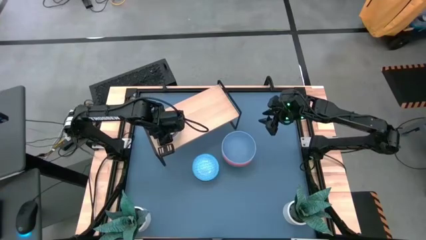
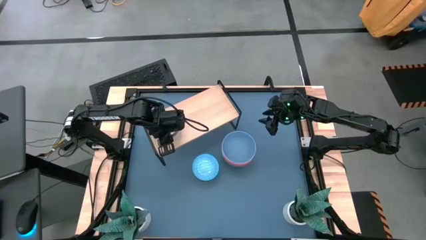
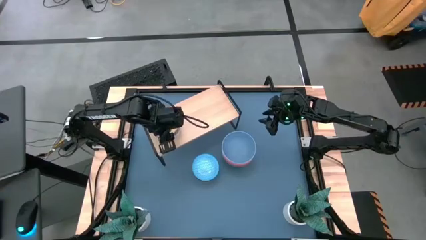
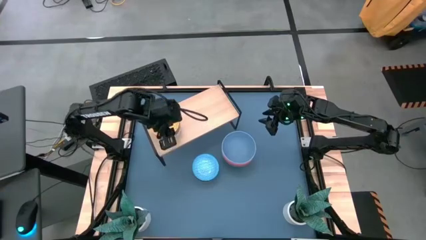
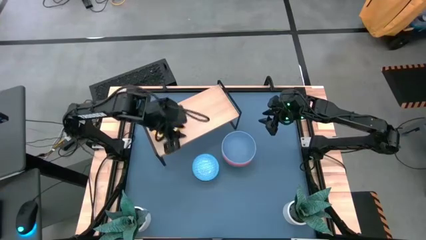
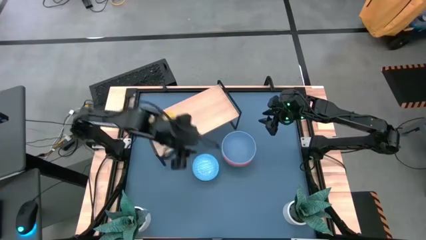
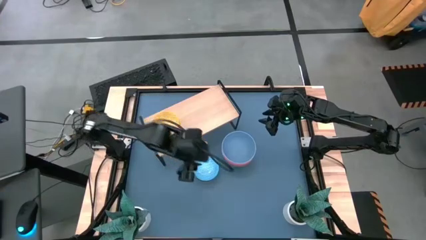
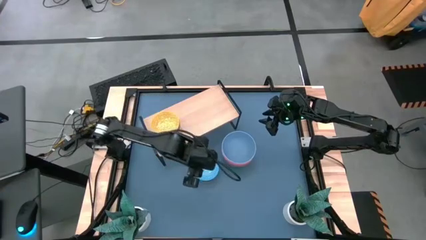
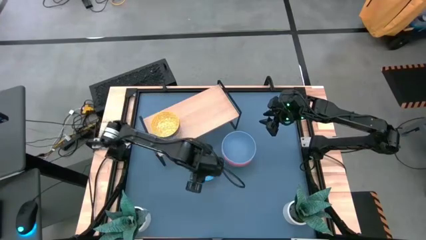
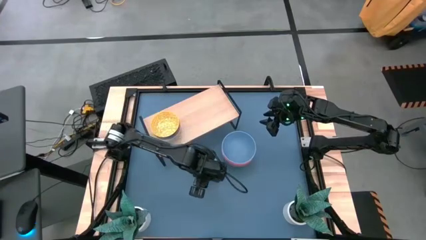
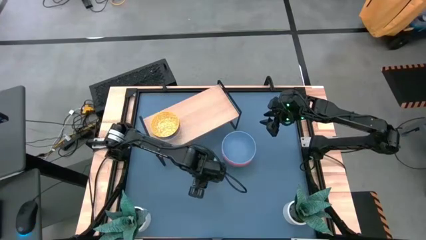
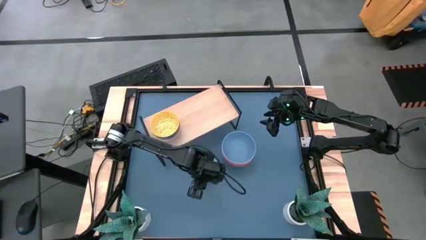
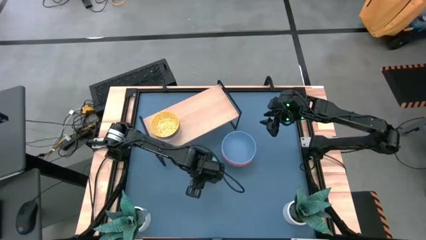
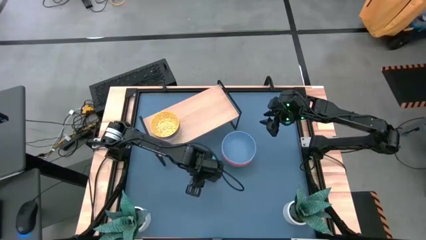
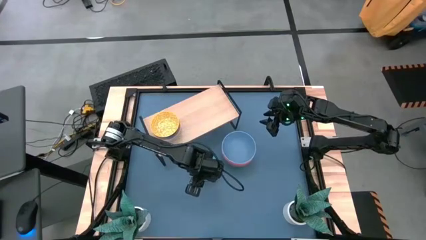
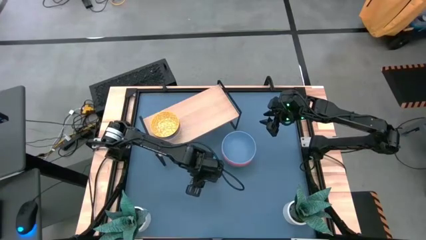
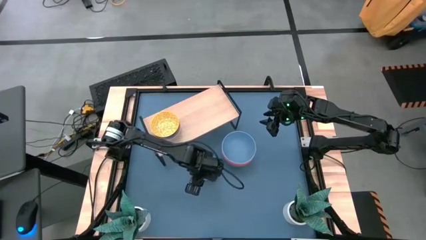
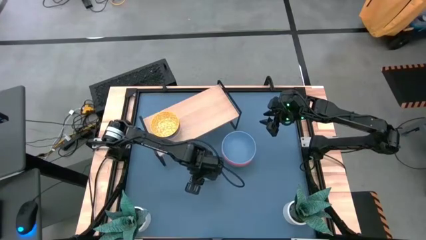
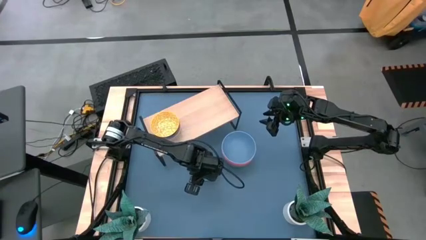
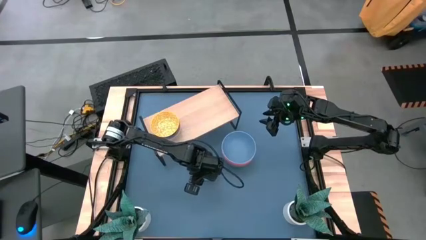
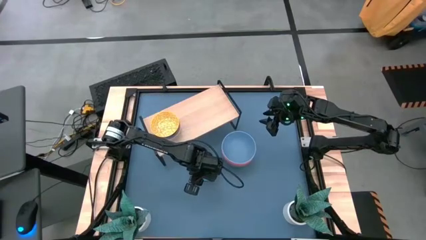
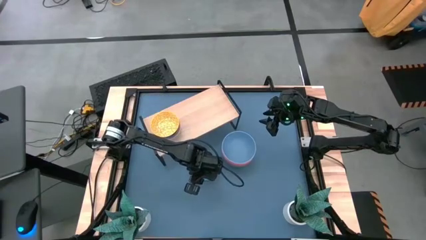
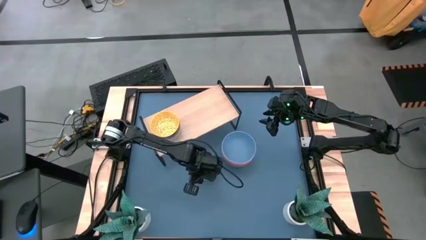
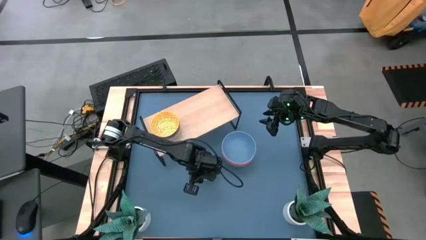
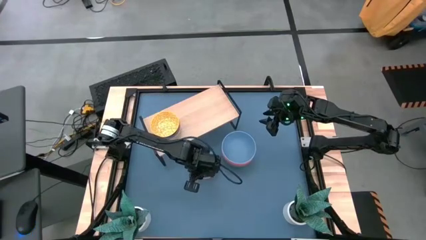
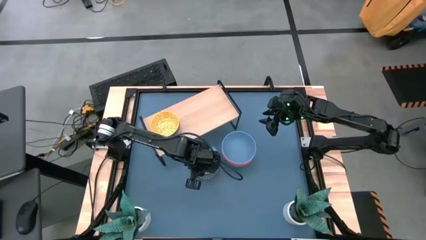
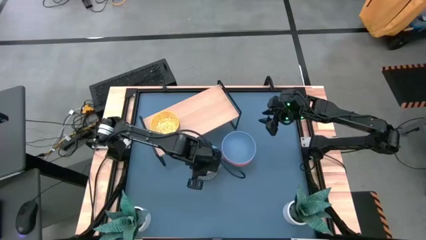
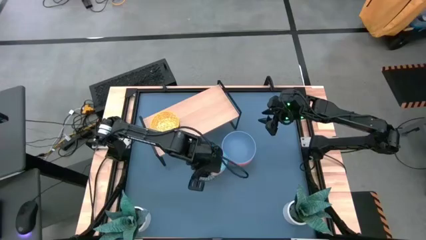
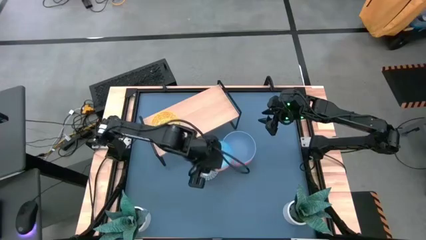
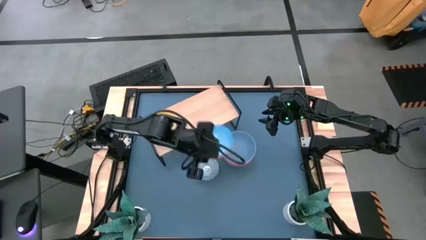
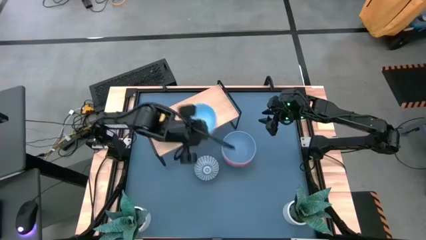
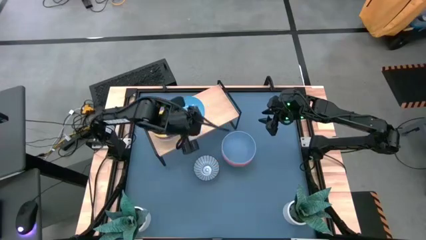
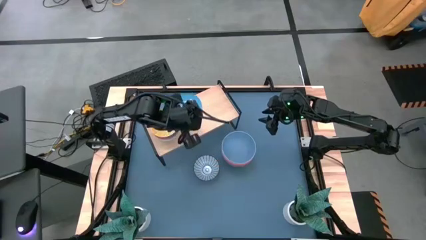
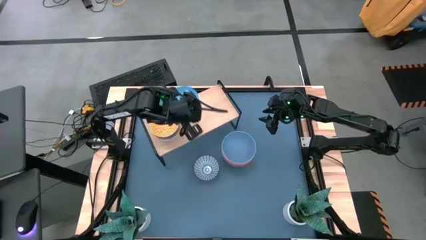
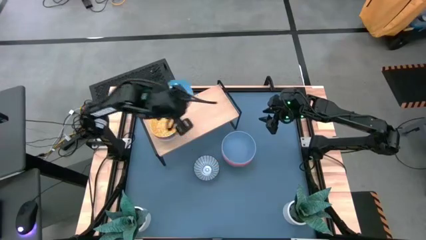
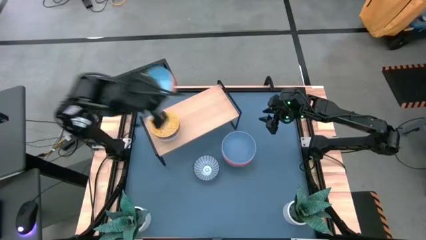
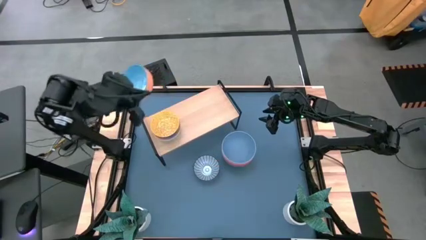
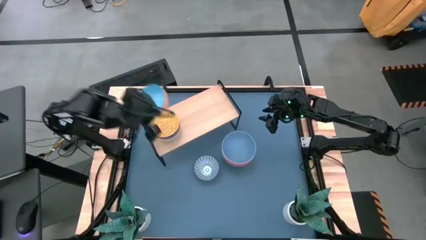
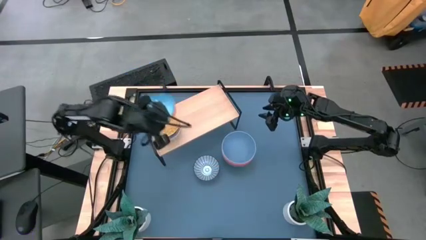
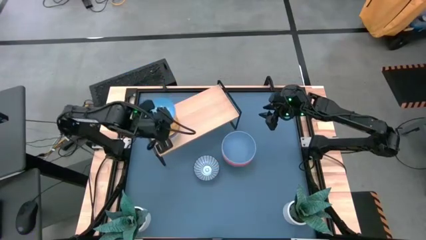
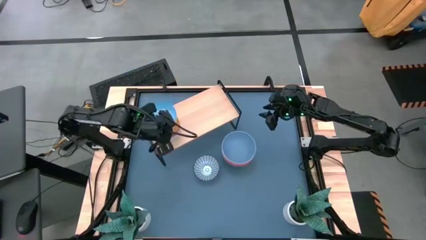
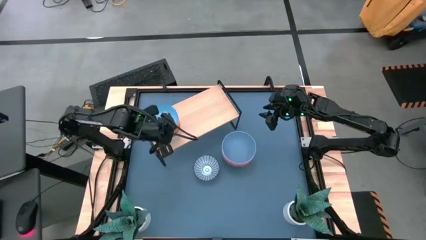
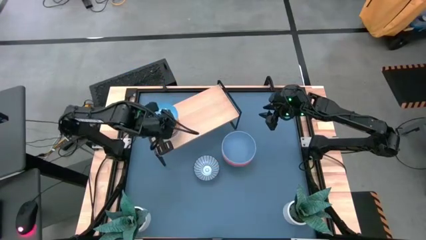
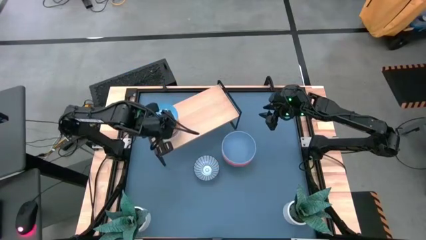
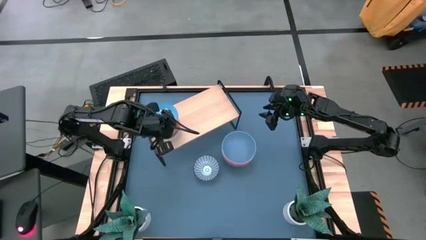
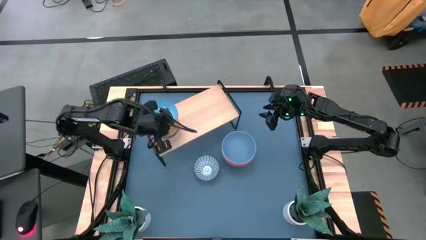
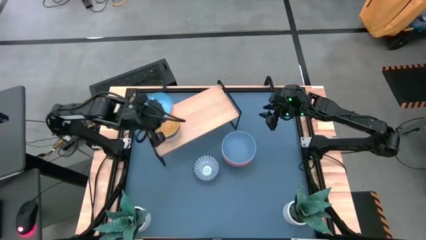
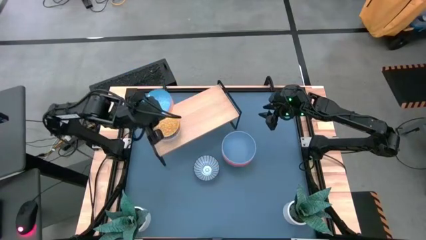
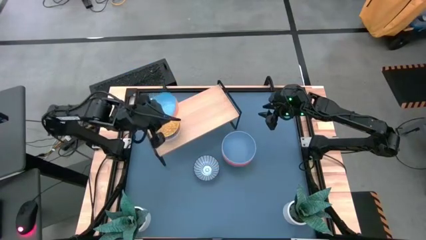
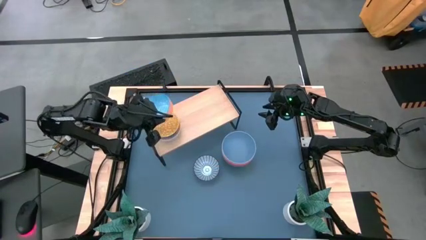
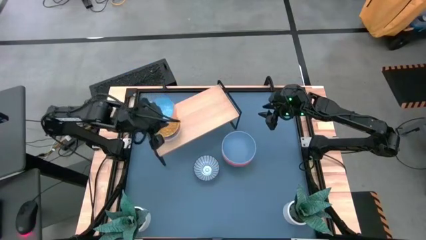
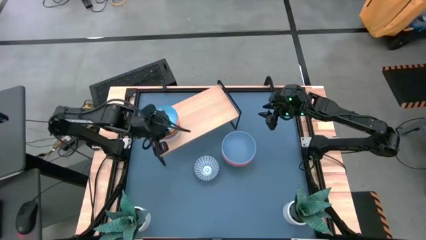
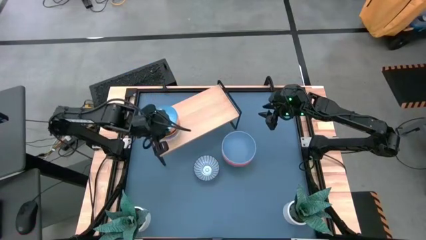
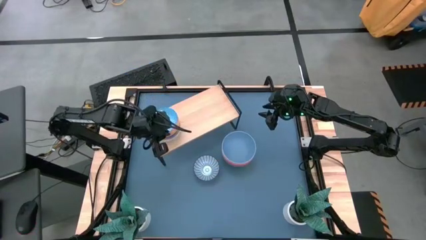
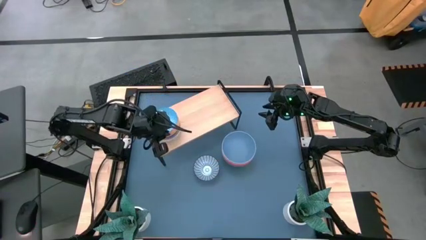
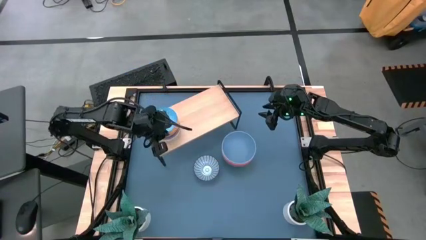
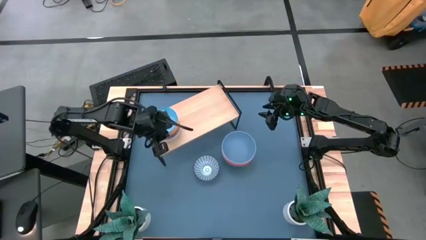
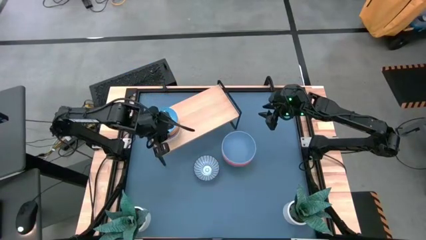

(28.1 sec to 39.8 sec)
Task: Place and stack bowls onto a shelf
Stack the small blue bowl on top the small yellow bowl on the shelf

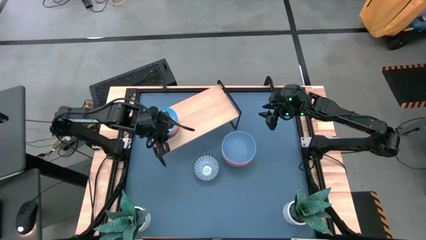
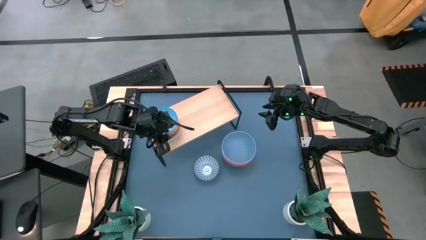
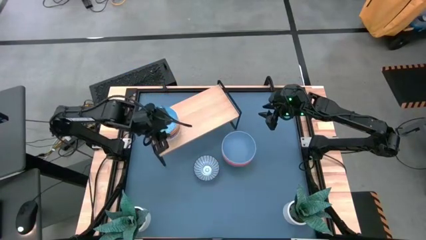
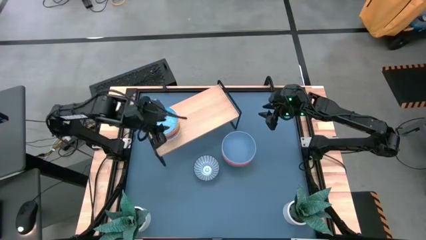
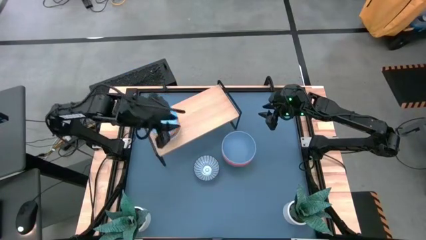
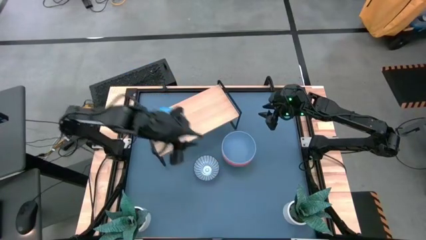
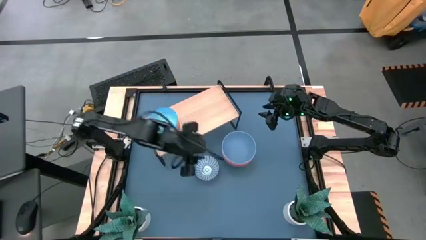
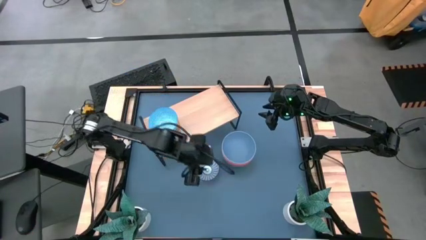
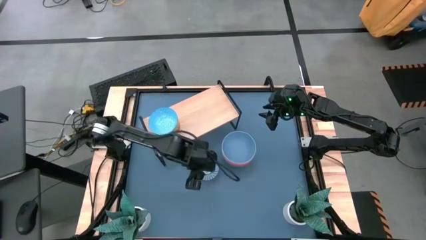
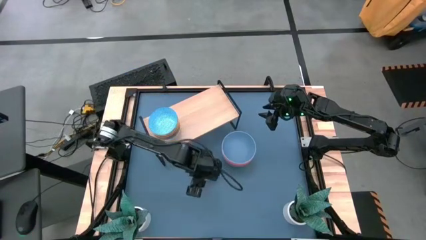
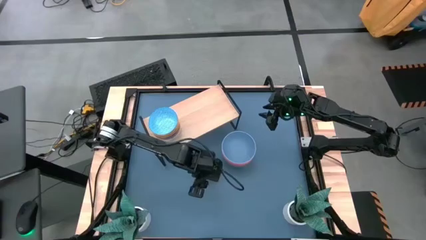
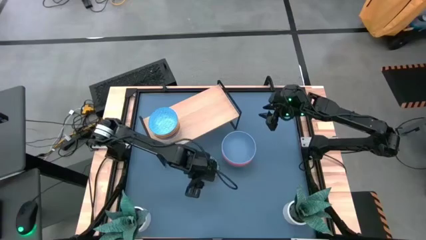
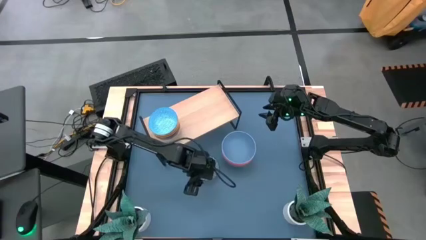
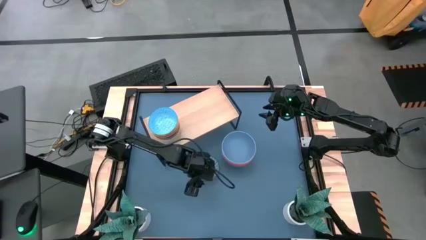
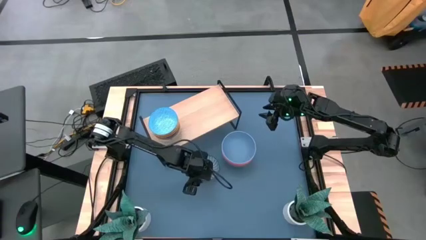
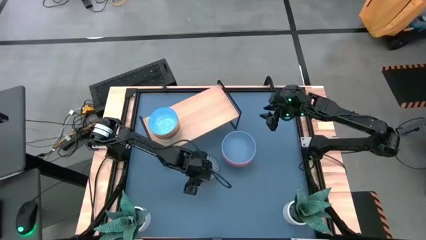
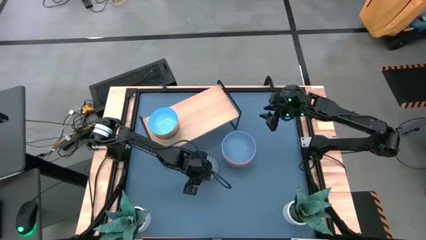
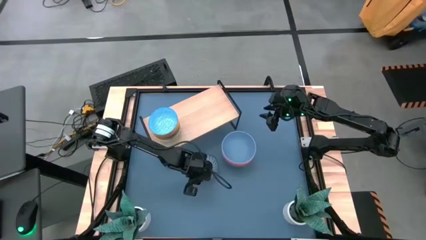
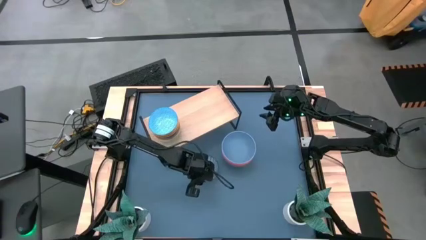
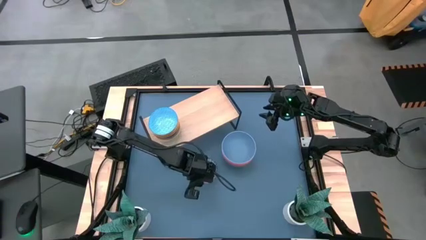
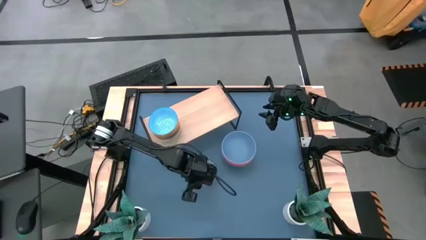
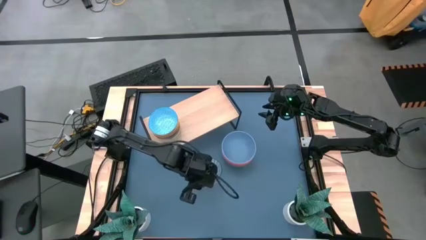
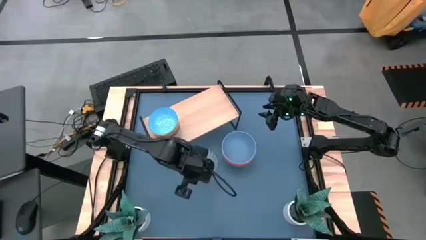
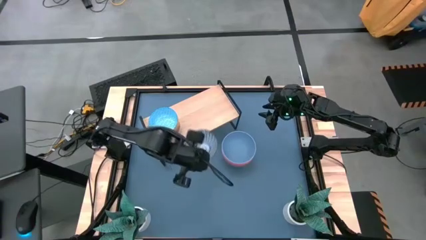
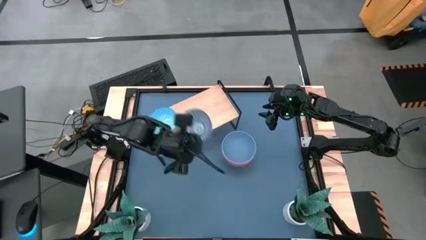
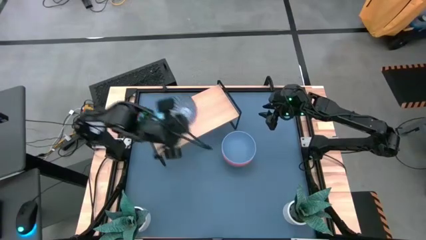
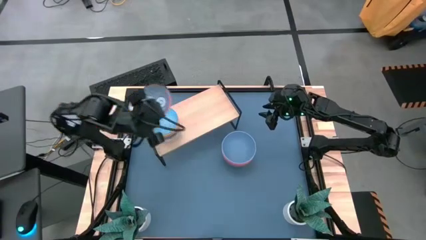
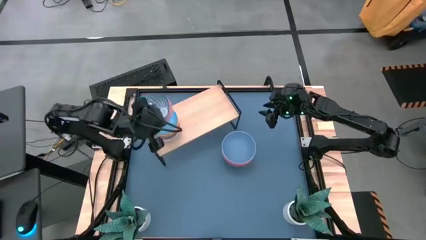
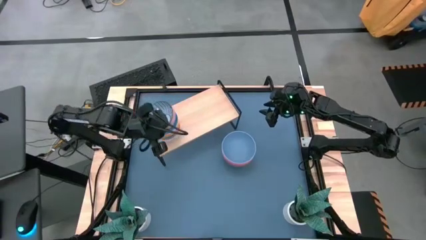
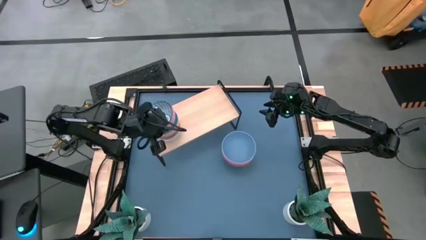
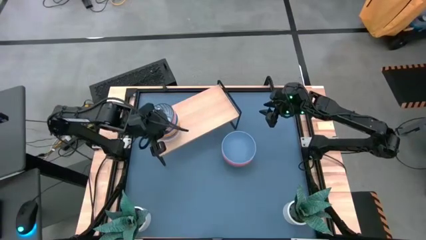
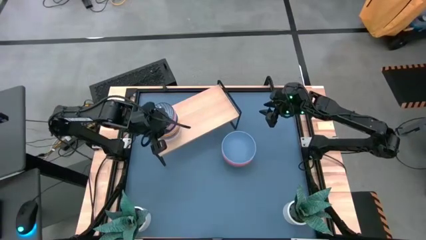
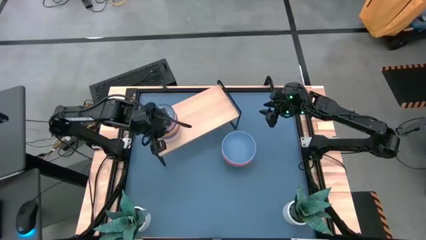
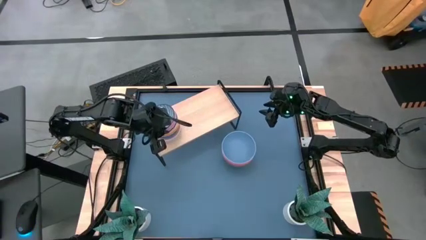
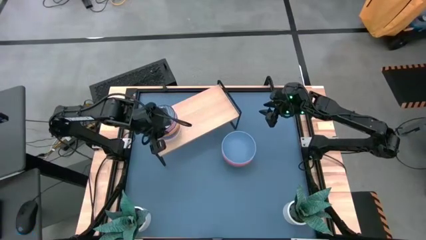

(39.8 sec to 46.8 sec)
Stack the small dark blue bowl on top of the small blue bowl on the shelf
